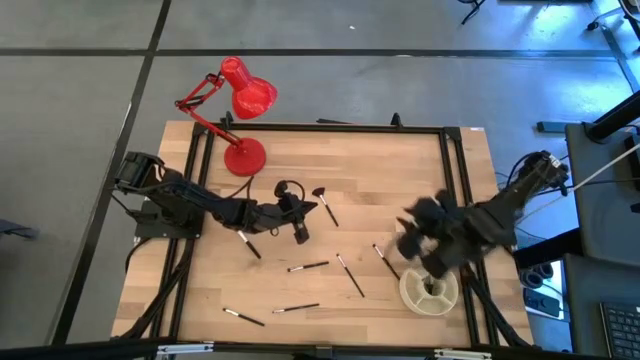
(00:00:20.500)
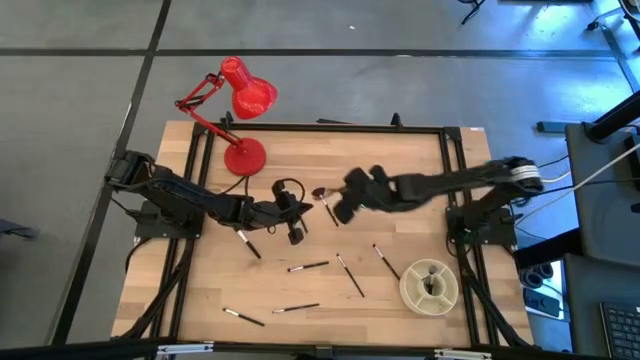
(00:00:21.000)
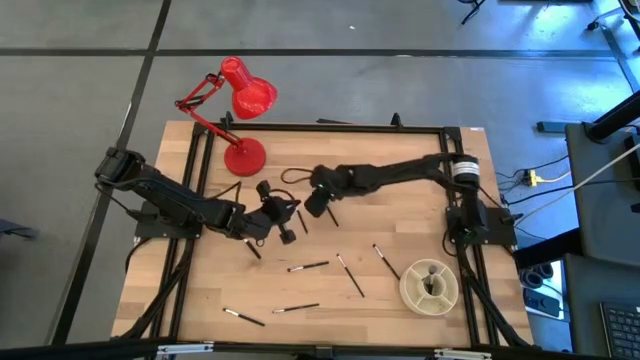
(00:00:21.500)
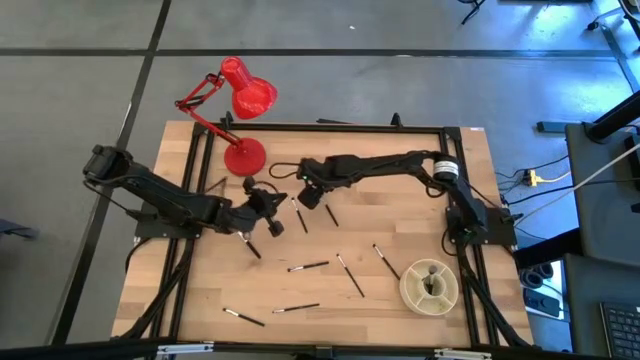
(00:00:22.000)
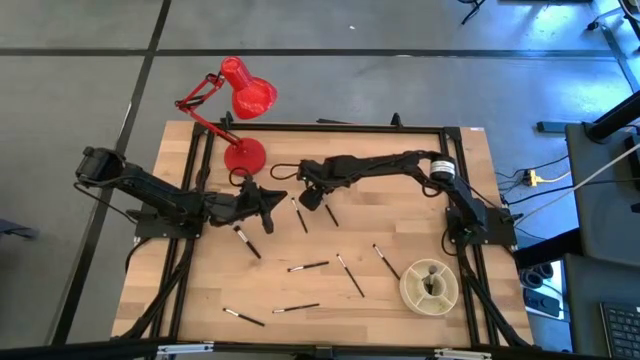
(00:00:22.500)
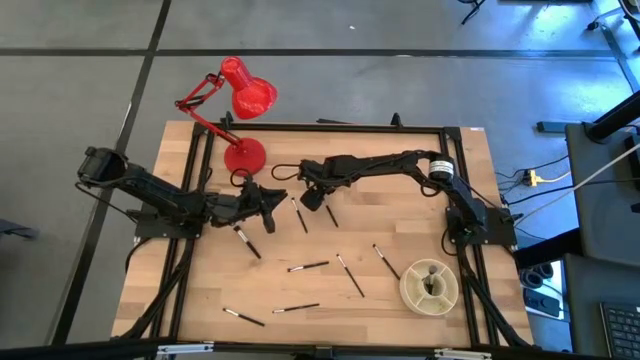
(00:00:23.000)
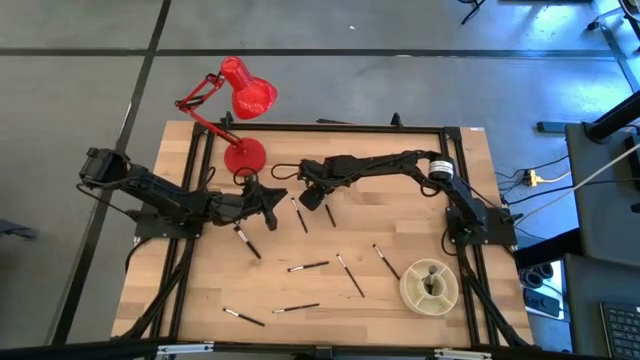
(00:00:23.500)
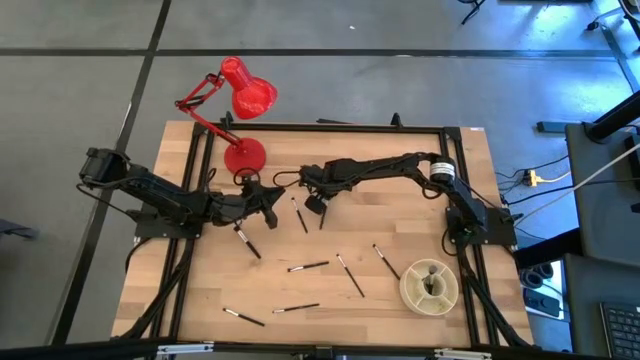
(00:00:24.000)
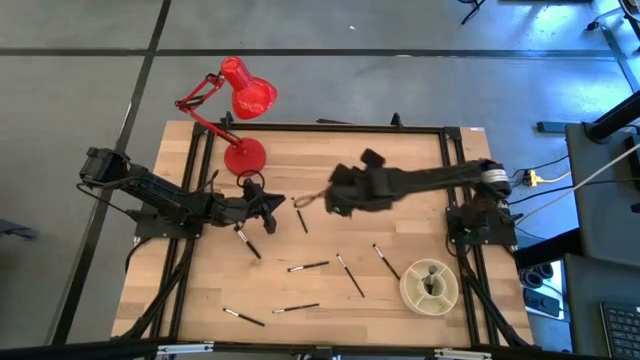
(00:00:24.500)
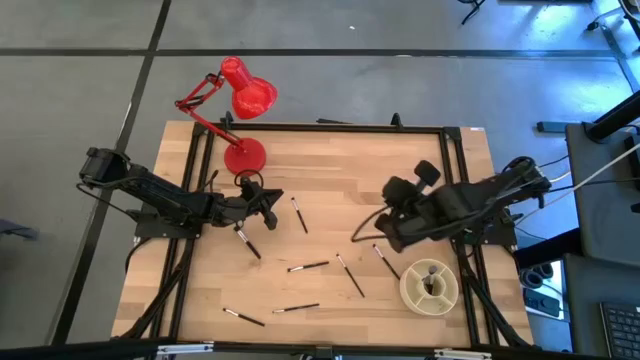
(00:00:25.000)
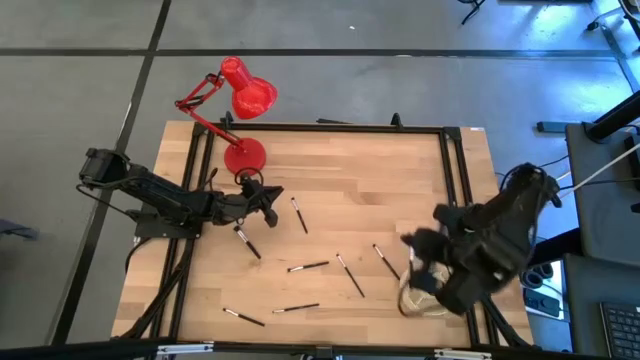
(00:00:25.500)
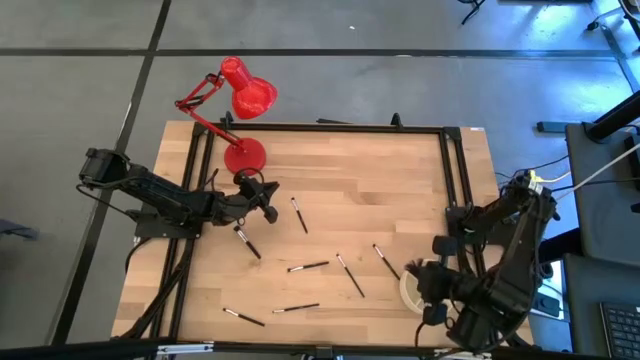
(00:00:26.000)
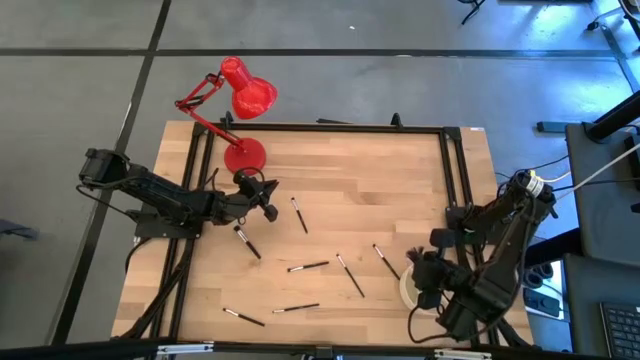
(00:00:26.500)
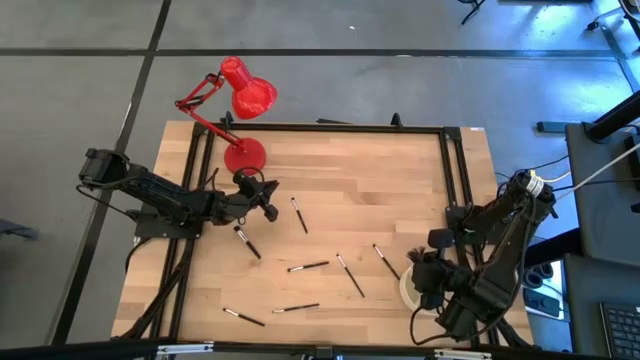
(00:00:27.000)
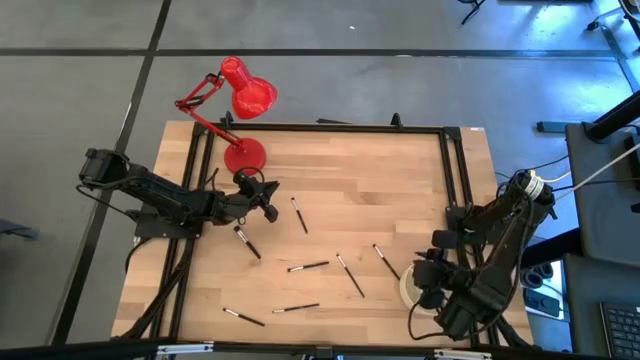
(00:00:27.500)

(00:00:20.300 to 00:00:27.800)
Task: Sort items
Put the highlighter brush into the brush organizer

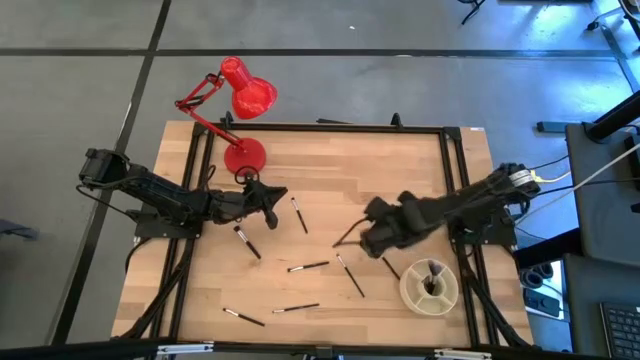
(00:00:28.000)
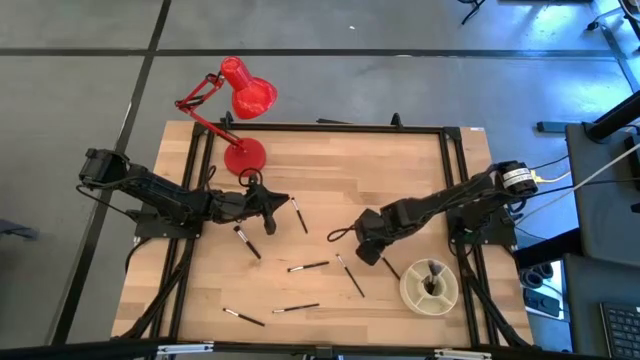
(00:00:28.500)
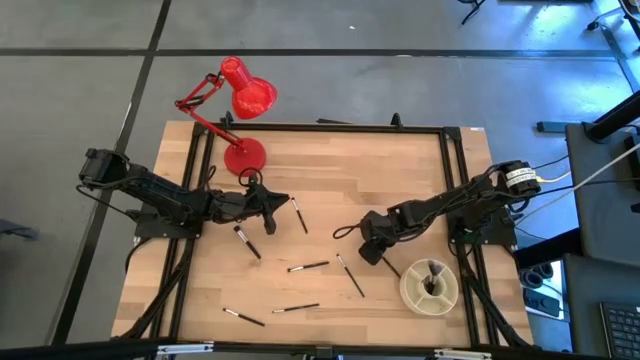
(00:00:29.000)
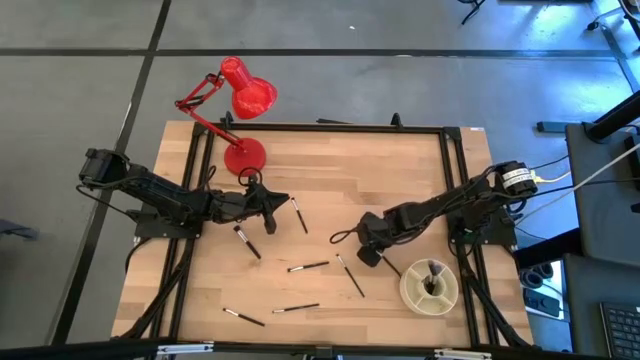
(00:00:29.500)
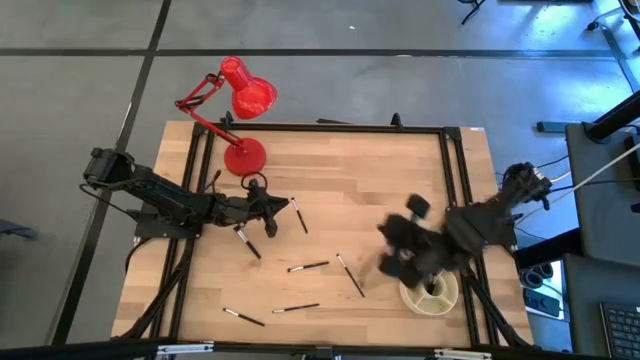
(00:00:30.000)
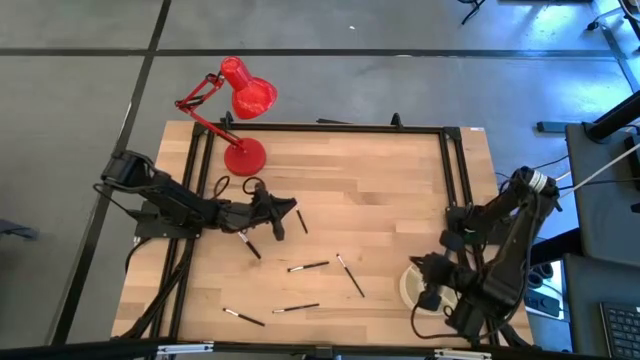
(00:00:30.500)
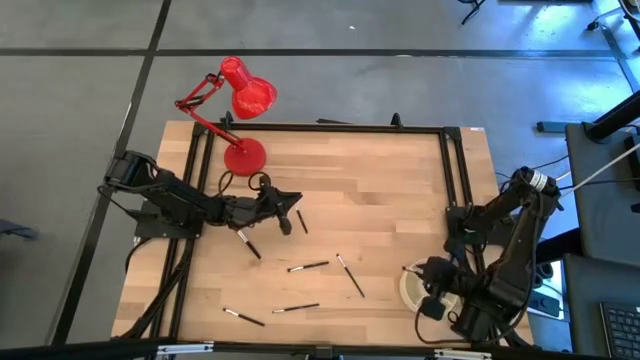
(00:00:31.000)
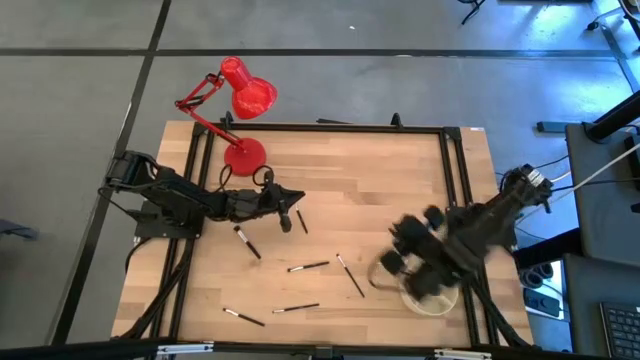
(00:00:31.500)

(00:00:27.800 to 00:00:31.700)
Put the eyeshadow brush into the brush organizer

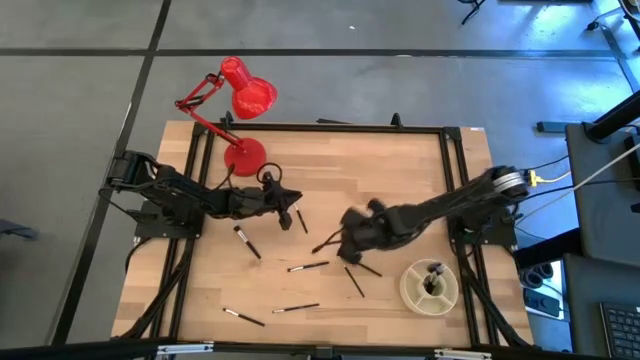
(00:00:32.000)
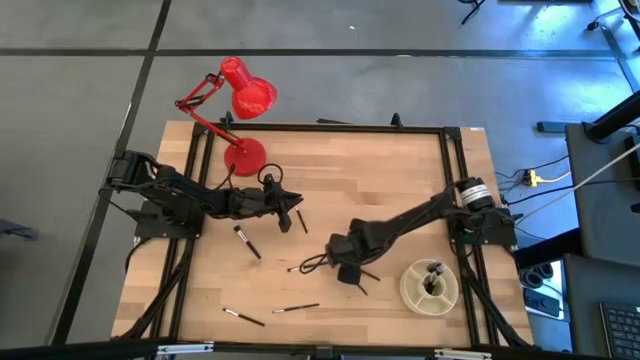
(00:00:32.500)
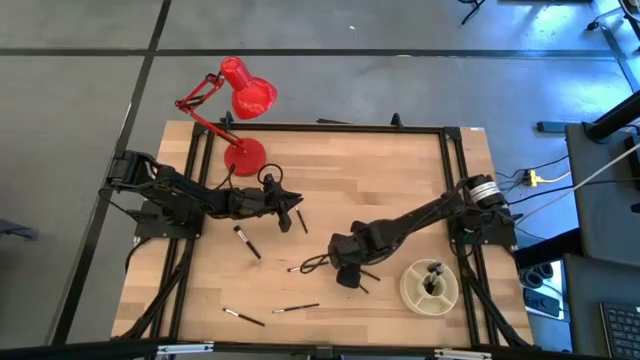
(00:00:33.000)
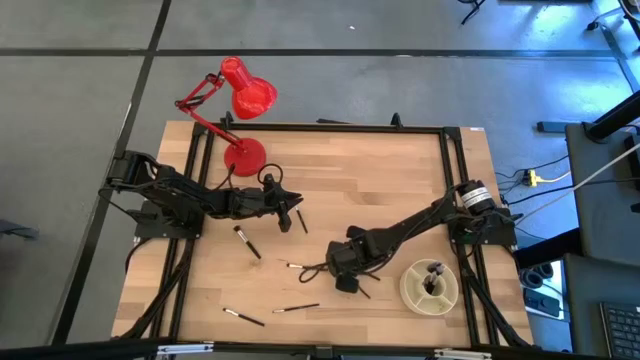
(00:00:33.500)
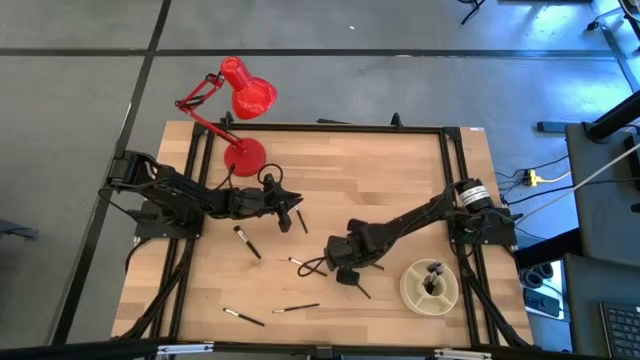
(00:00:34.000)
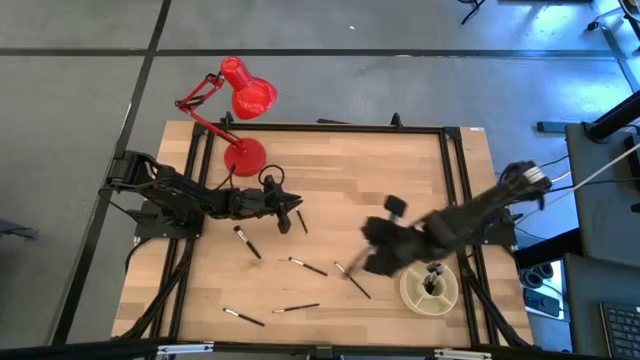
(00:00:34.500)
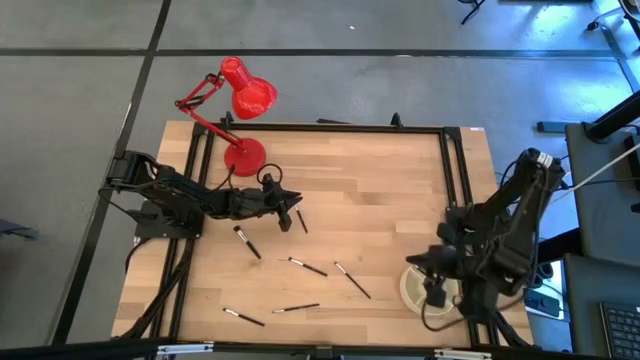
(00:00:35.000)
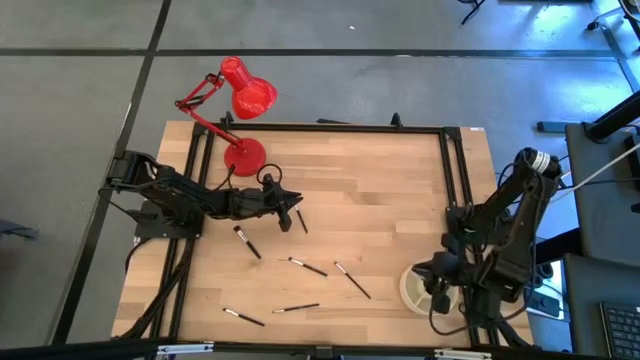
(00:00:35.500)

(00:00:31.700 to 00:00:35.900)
Put the eyeshadow brush into the brush organizer

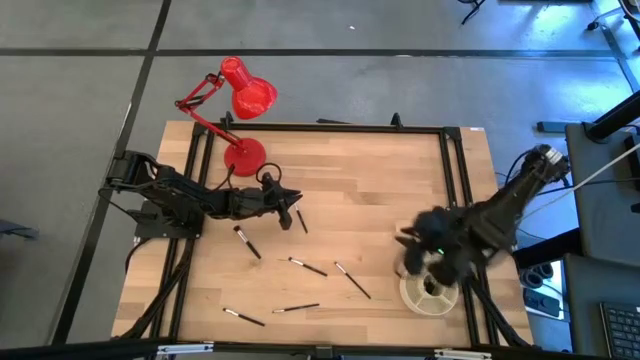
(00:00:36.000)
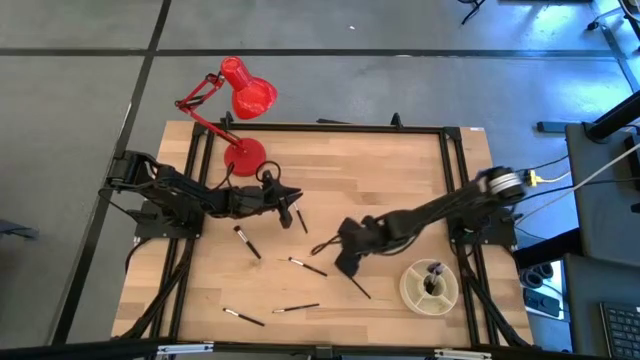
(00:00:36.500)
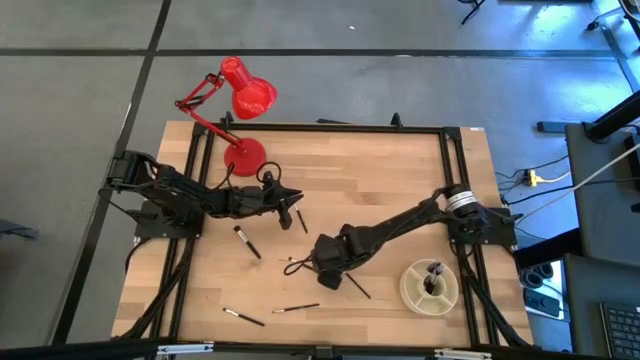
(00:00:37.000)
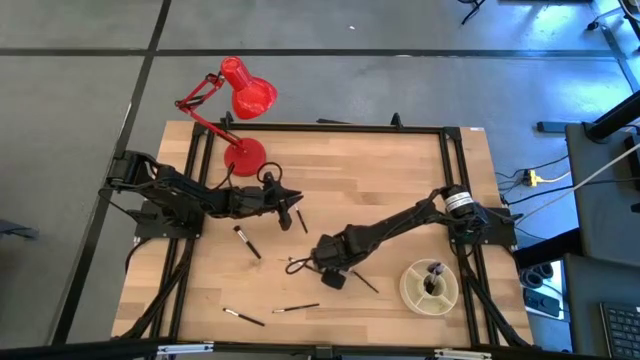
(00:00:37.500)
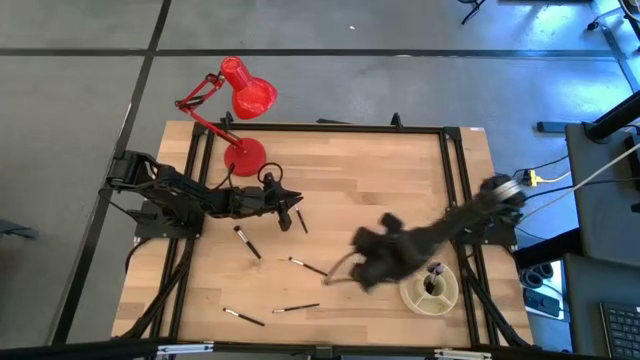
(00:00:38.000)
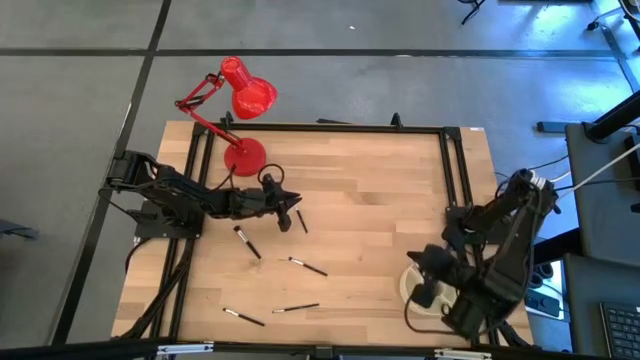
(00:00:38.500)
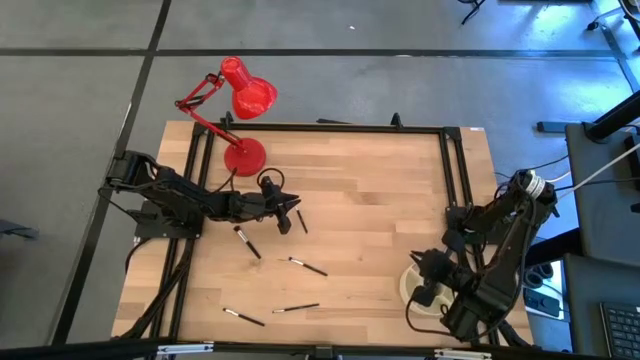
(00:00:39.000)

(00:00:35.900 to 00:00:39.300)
Put the eyeshadow brush into the brush organizer

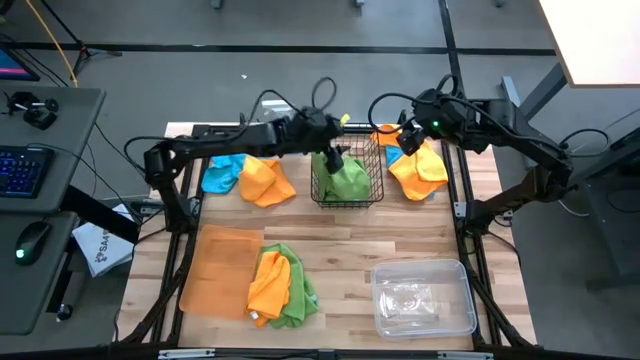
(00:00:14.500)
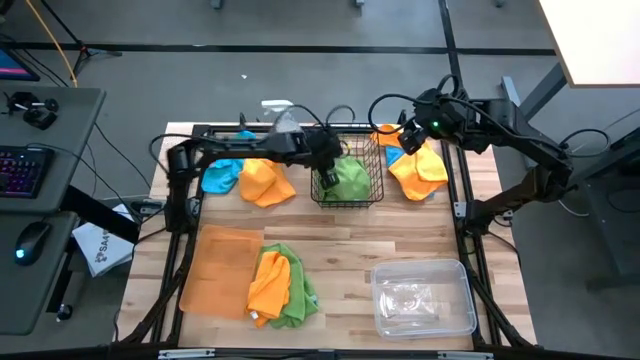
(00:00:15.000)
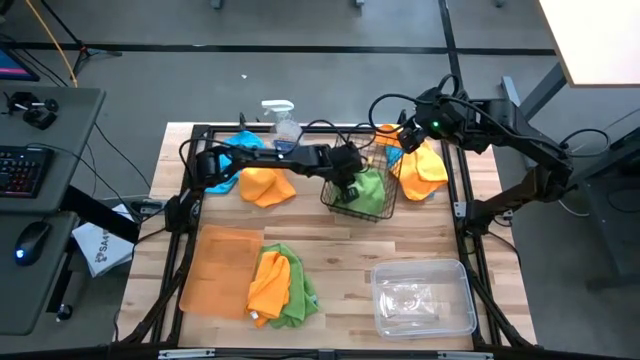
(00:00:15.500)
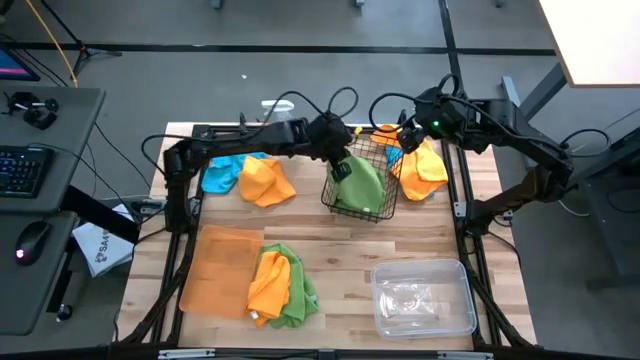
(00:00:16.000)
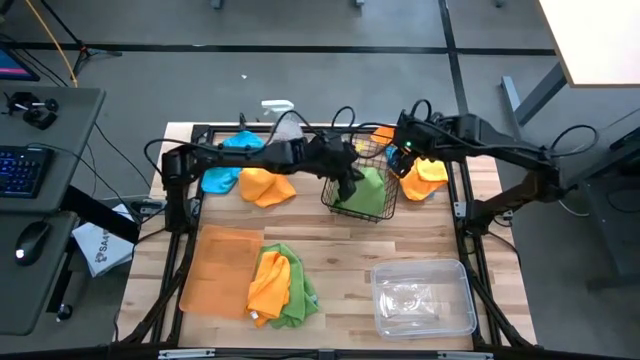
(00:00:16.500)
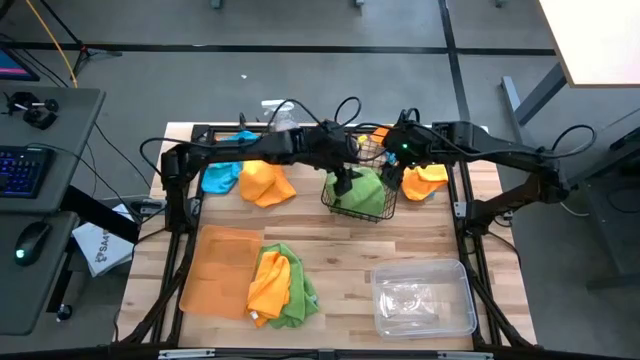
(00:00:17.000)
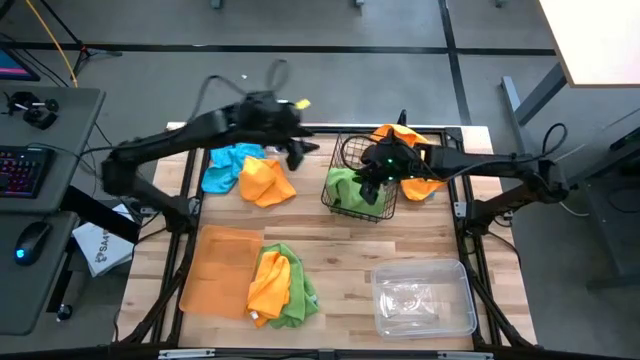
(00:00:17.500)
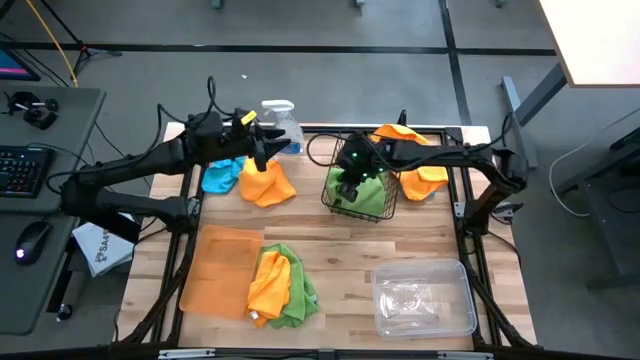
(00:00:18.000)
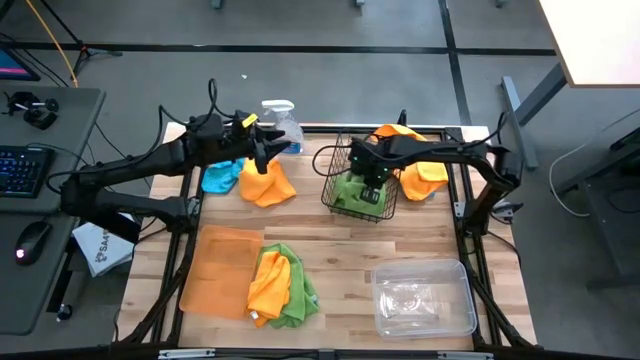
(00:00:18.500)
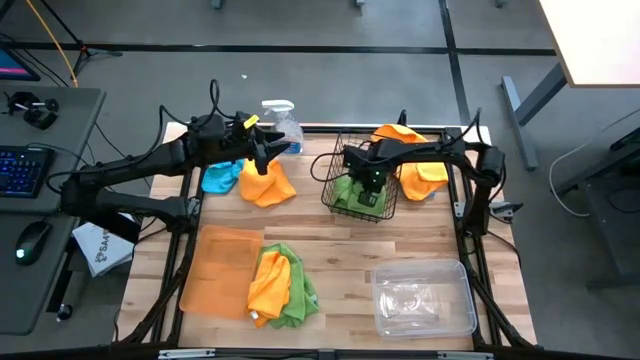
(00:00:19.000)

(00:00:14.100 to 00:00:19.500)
Task: Sort microfiber towel by color & place in baskets
Adjust the green microfiber cloth into the bin
